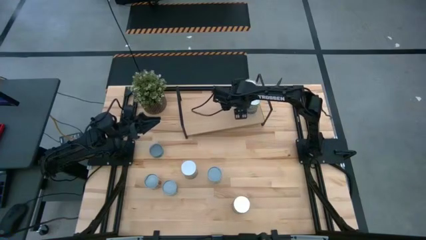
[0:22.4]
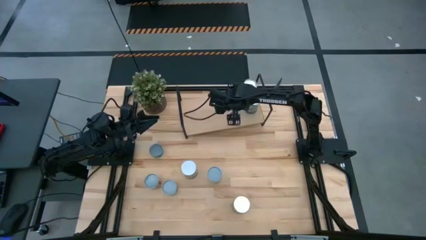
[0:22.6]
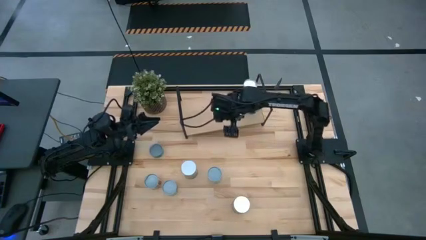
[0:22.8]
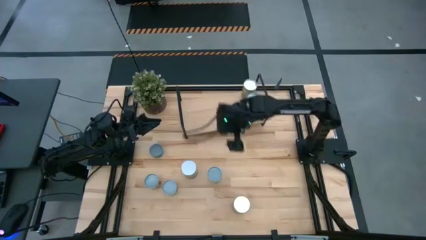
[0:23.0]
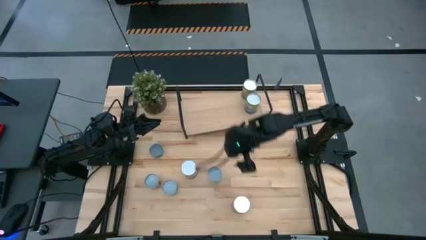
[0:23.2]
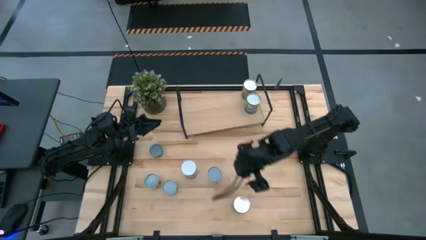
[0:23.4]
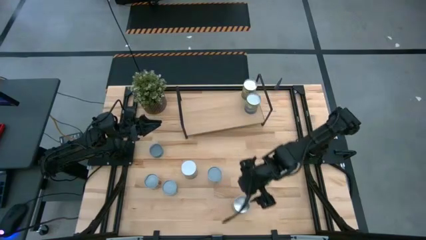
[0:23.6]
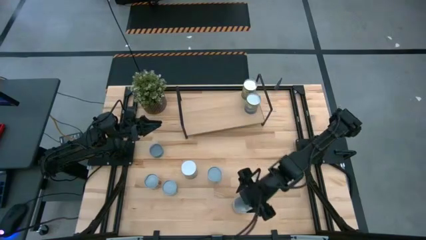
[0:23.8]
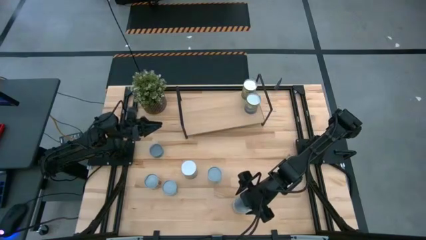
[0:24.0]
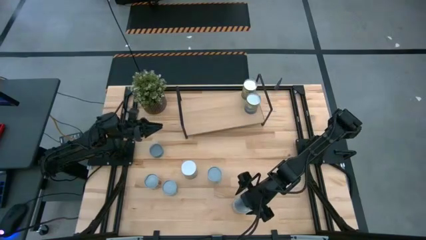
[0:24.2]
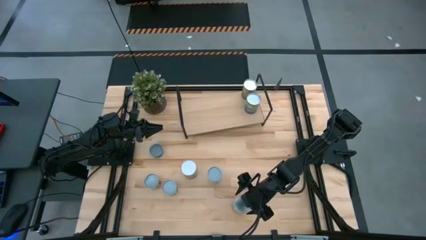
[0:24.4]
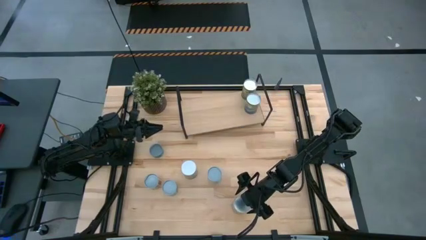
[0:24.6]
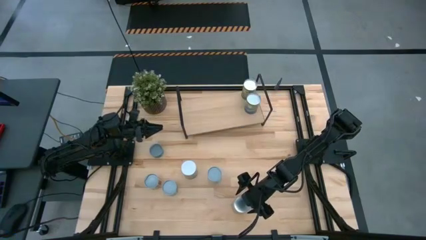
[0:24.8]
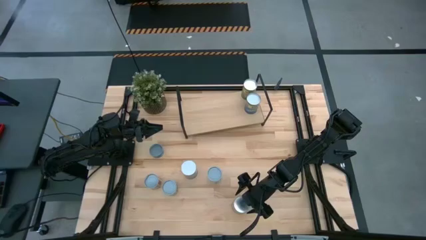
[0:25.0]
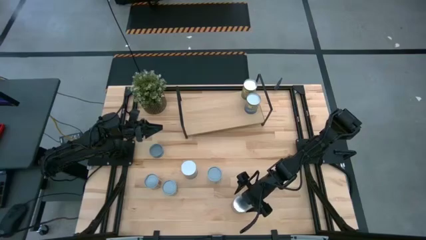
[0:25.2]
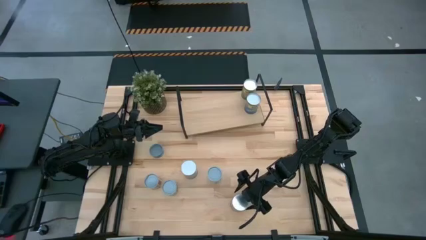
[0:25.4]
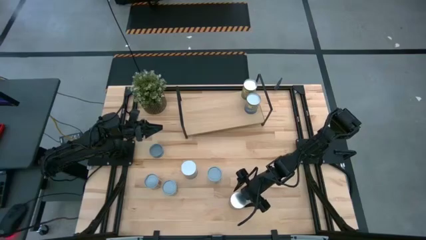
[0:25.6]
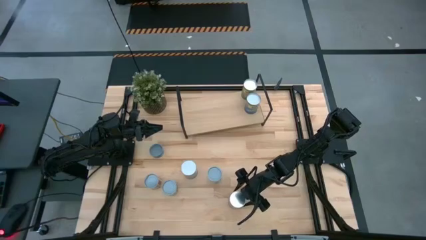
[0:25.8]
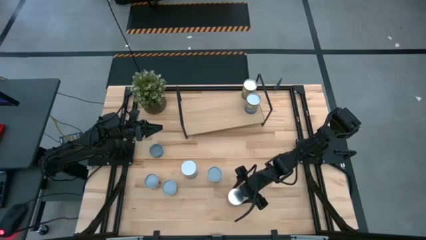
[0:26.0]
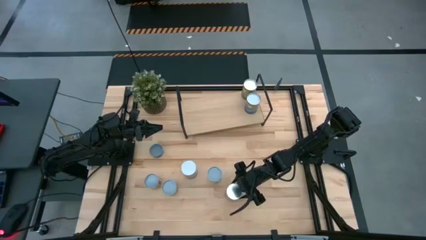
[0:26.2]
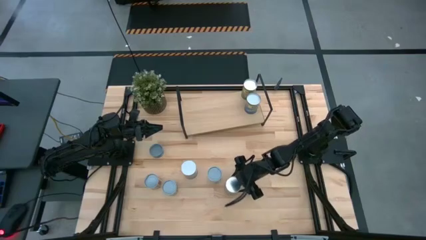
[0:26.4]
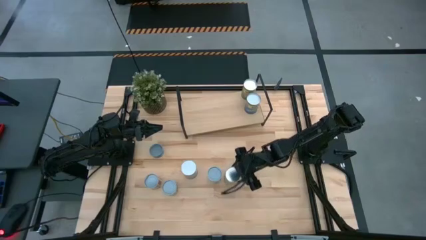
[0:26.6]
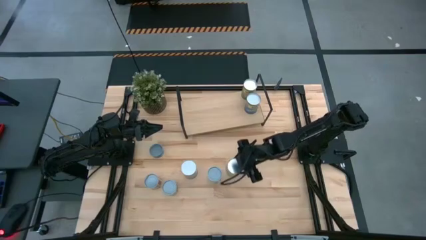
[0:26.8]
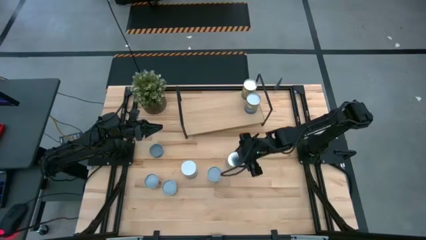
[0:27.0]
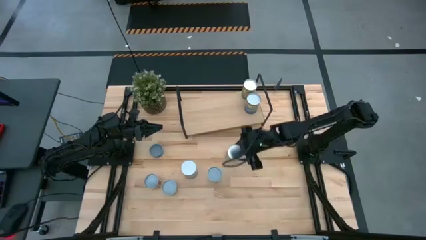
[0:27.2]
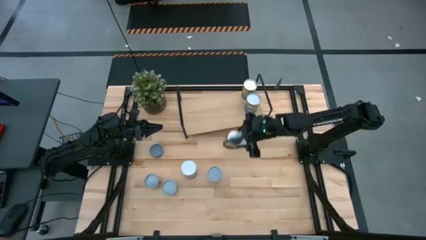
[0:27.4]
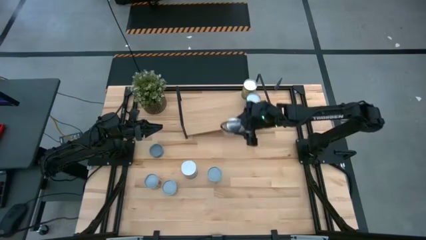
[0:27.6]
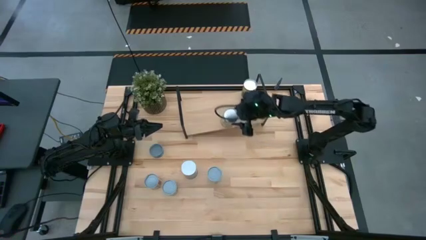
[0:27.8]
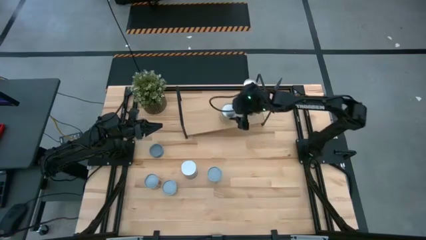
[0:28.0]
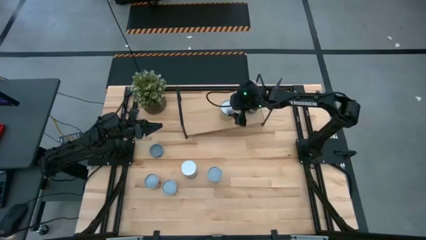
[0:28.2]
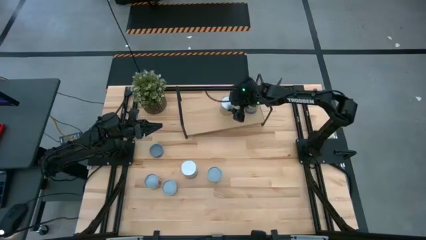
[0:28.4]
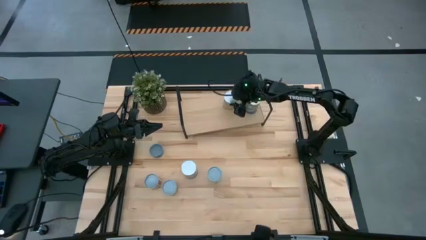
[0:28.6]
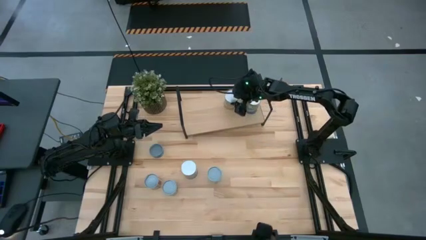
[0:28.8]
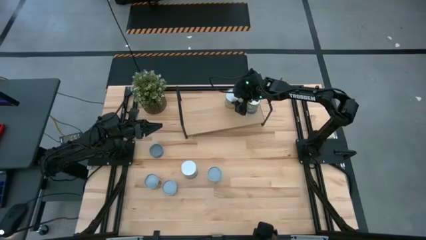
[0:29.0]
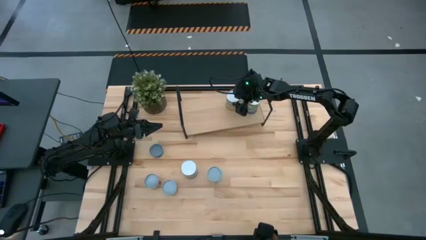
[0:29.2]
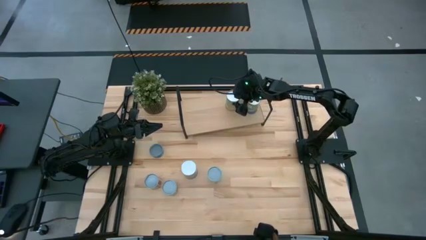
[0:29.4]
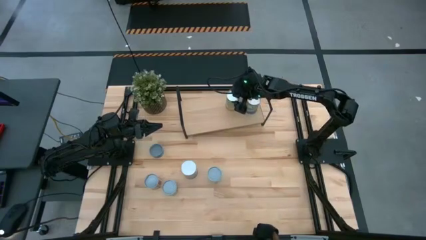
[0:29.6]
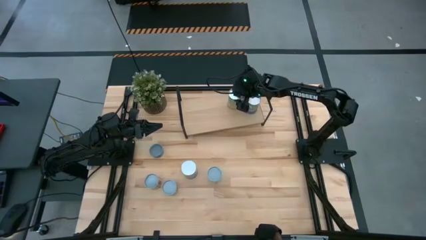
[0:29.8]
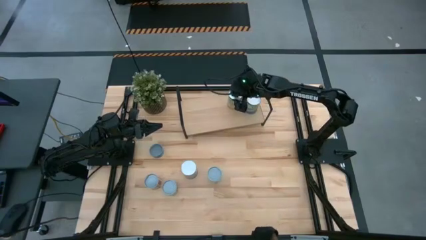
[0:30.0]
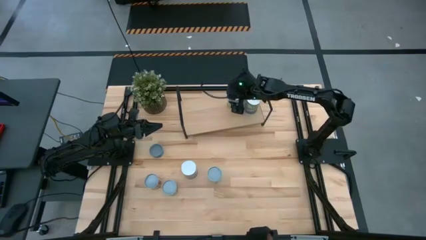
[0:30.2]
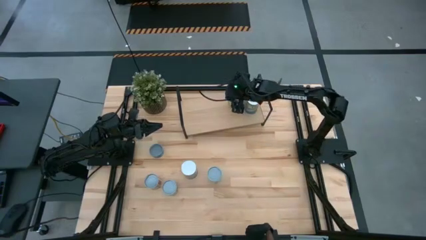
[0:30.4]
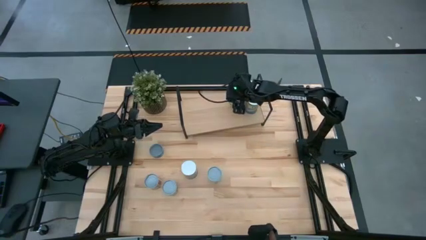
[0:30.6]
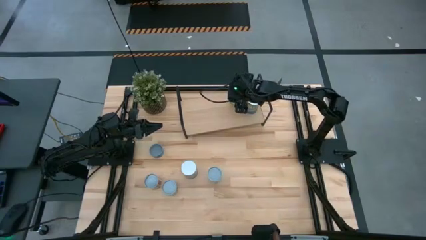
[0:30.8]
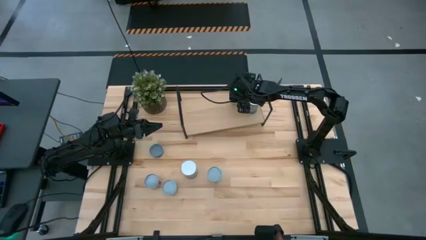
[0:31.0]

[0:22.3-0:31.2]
Task: Pick and place cans onto a shelf
Put the canned carrots on the shelf

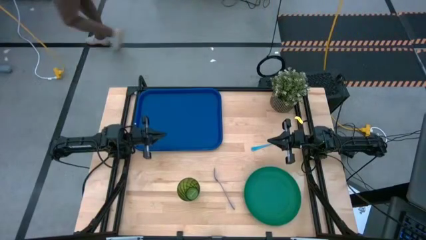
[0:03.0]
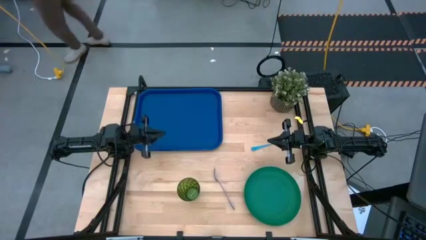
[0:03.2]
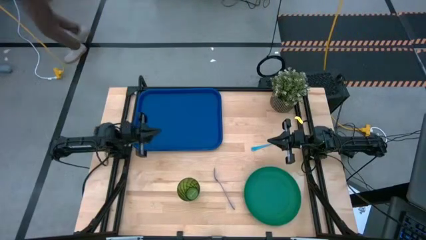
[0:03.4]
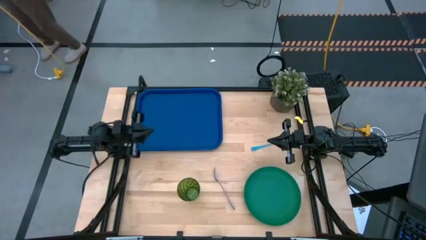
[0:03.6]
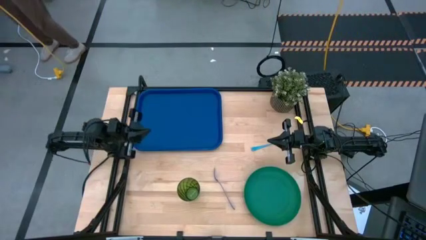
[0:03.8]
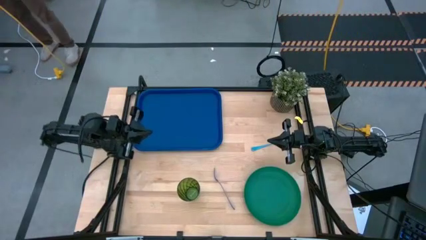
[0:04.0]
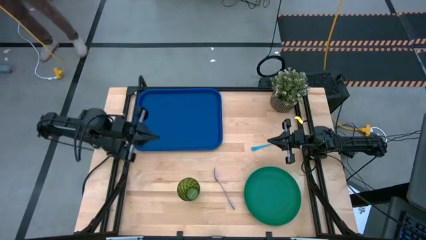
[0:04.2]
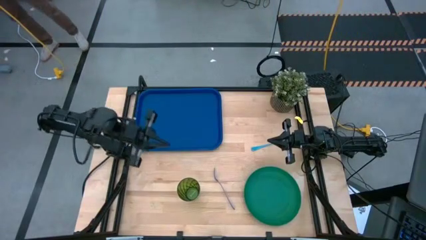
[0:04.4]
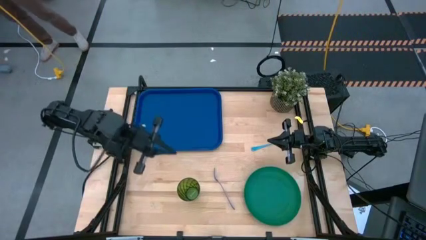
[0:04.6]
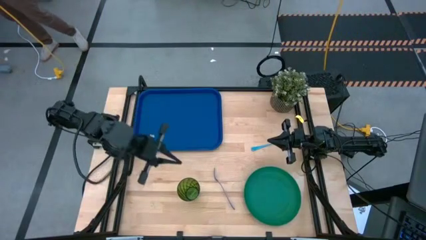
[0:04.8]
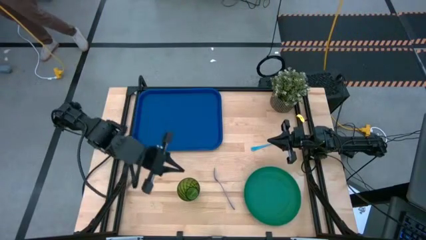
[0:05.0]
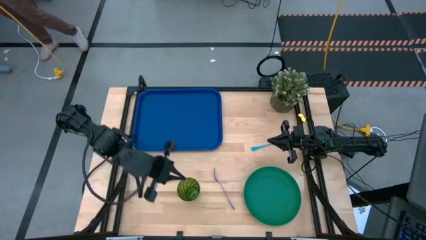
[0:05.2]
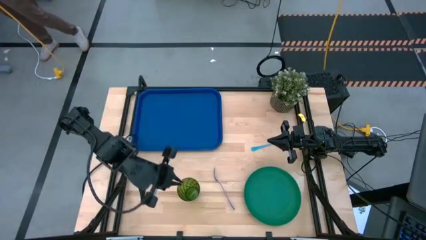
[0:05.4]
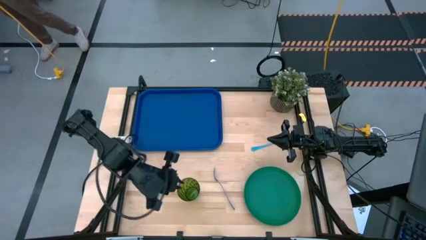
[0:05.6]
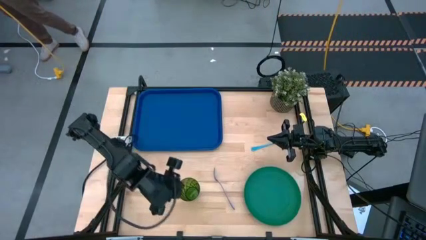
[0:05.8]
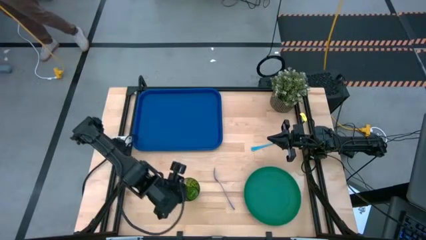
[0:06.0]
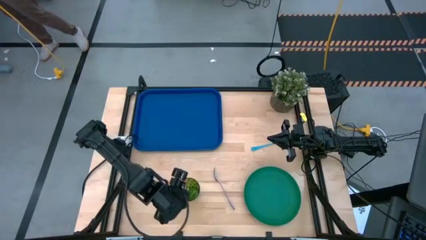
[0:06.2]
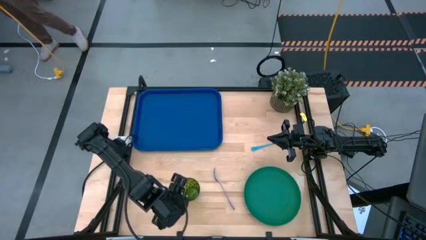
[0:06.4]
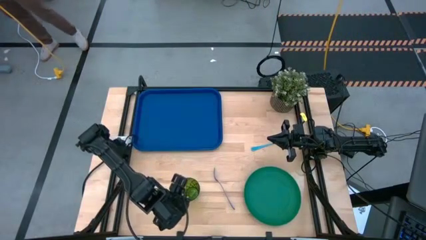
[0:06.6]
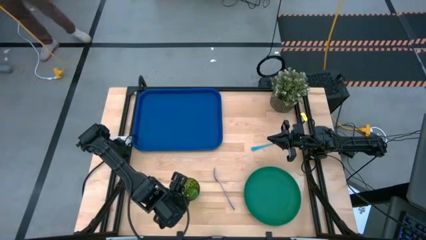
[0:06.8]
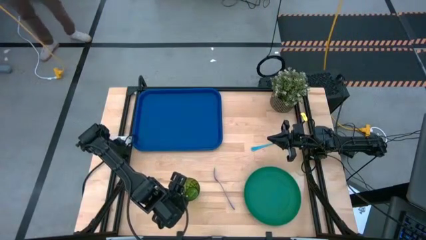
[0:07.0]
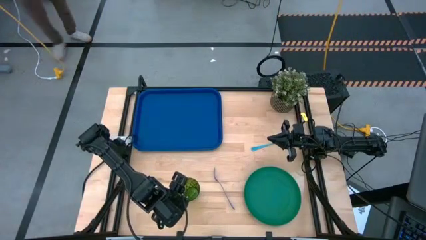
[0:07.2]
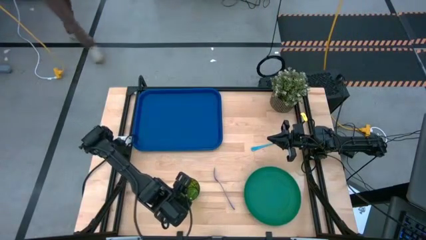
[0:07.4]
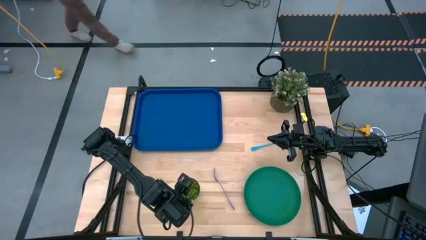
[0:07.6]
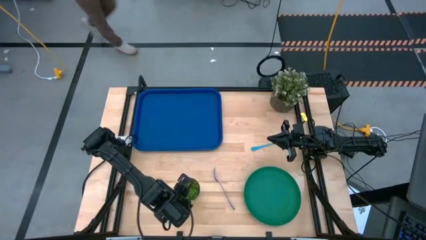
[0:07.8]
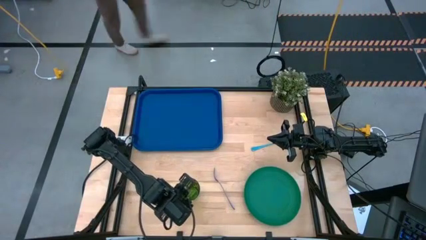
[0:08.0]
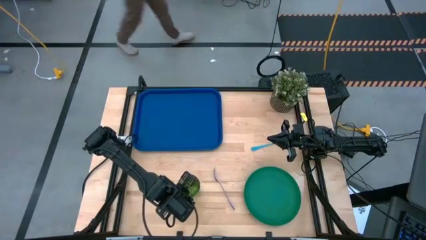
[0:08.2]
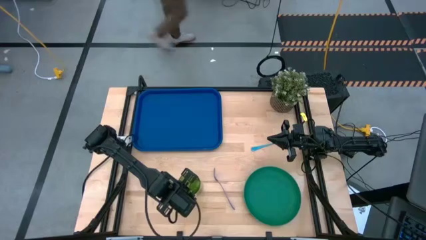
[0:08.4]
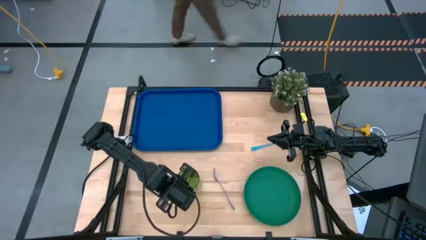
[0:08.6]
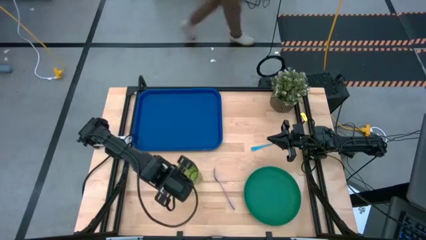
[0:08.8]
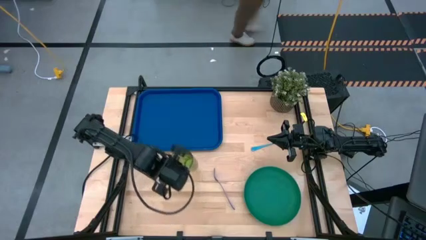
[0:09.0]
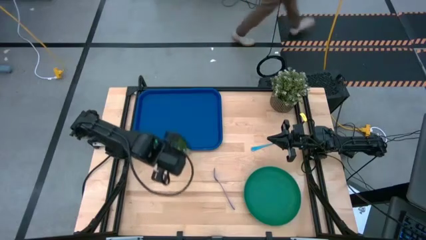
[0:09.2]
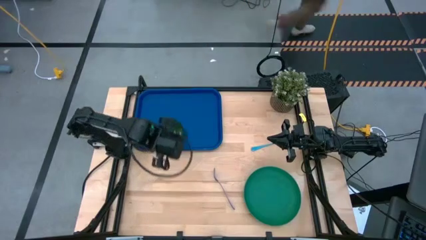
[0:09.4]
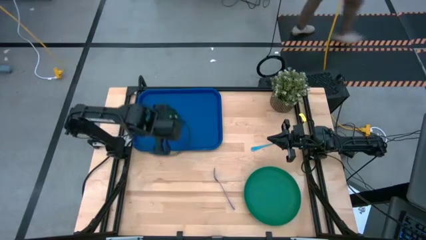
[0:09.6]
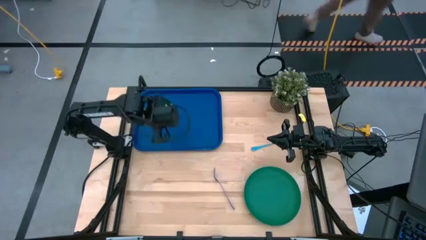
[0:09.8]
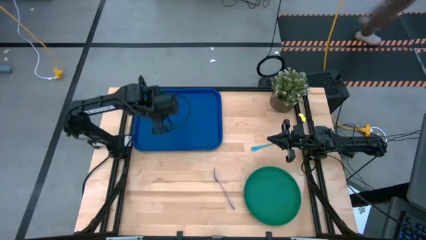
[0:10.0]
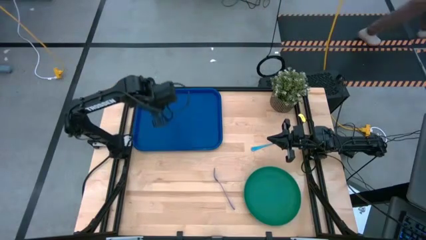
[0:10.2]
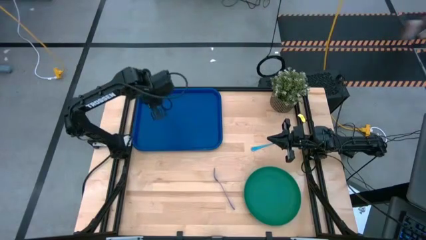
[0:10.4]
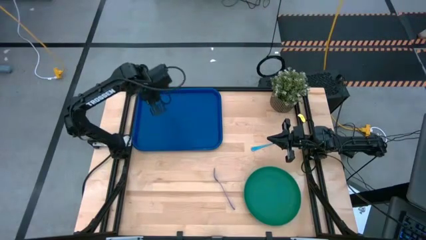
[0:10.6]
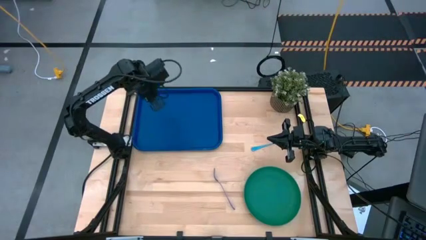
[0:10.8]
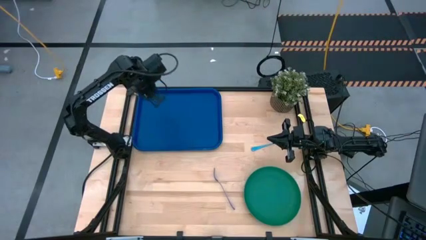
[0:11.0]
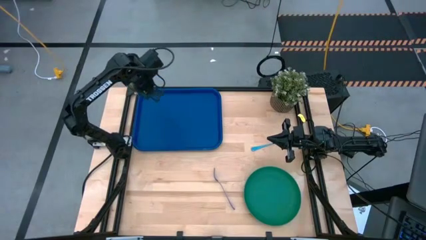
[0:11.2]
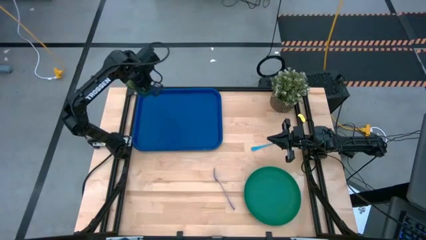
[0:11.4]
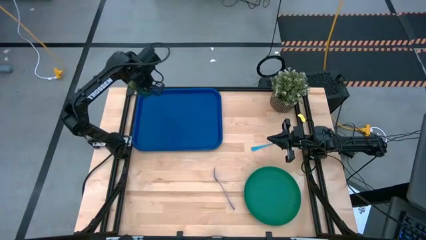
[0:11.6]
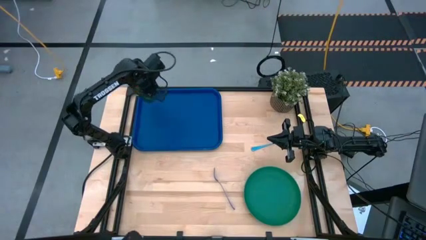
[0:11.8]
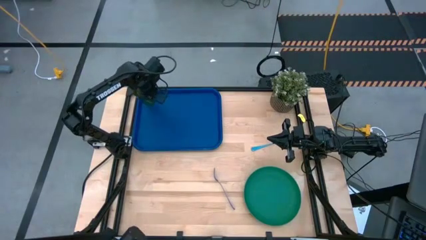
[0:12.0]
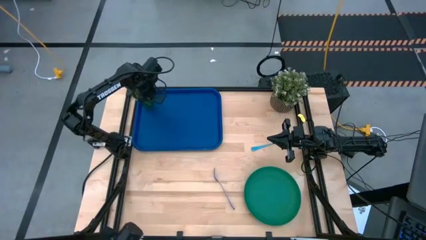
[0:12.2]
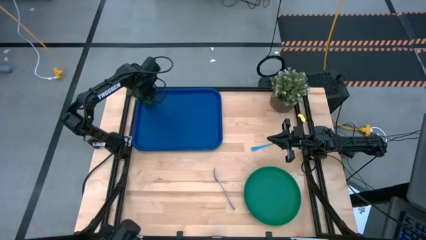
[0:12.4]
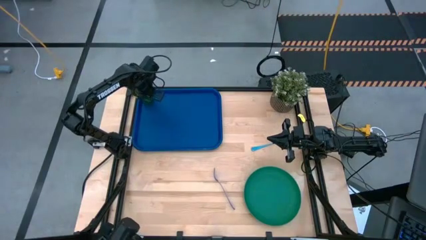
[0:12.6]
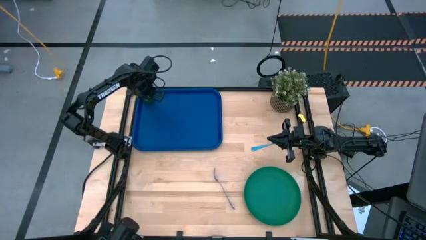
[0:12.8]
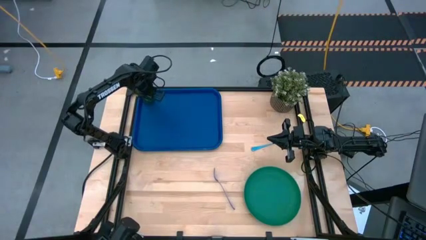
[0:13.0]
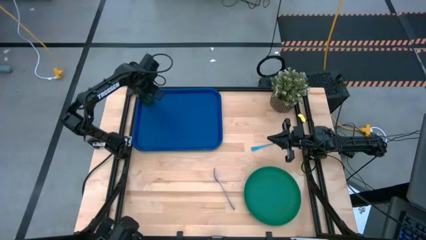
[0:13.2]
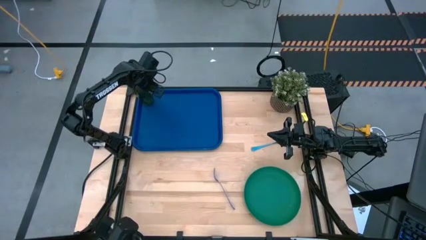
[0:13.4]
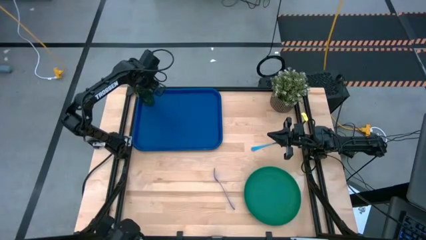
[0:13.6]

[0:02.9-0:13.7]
Task: Pick and place plate/cup/fork/spoon on tray
Put the green glass on the top left of the blue serving tray
